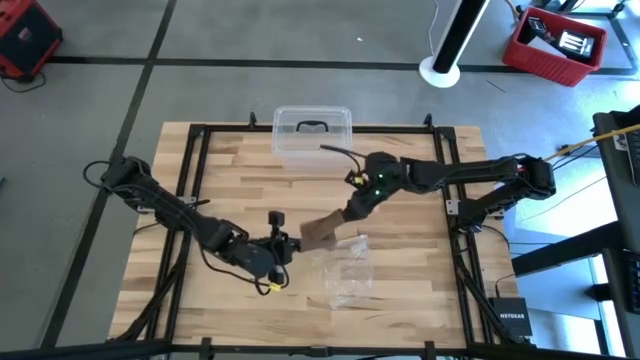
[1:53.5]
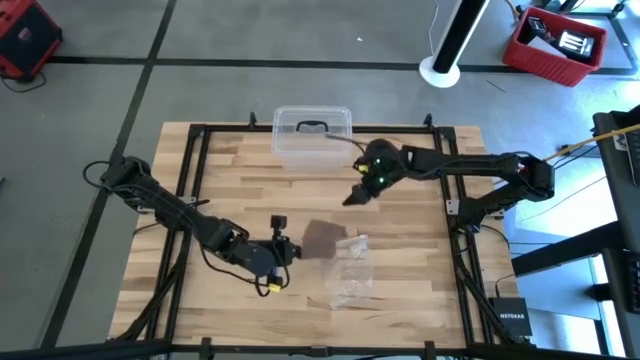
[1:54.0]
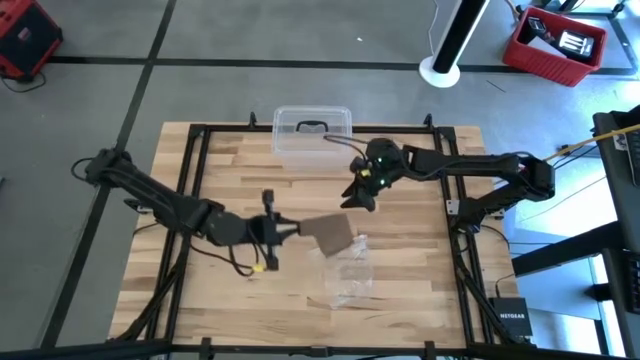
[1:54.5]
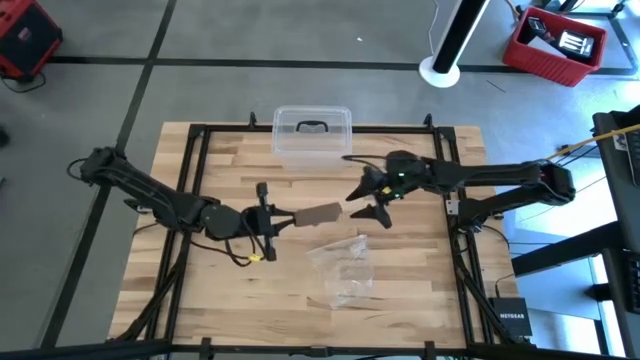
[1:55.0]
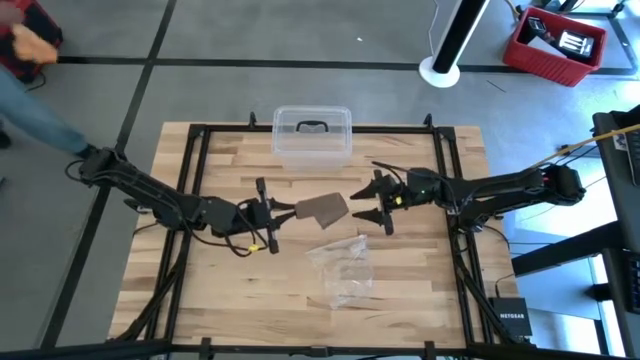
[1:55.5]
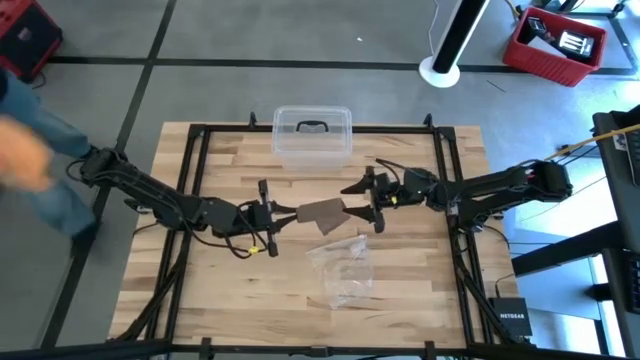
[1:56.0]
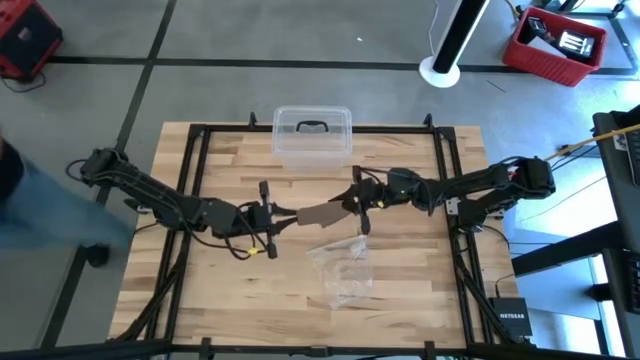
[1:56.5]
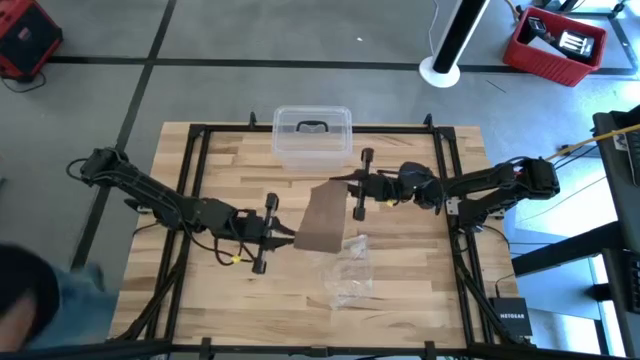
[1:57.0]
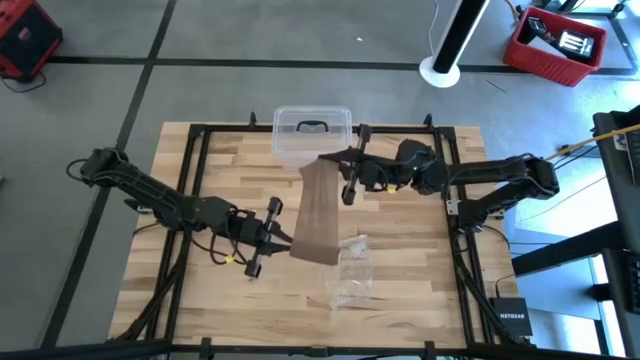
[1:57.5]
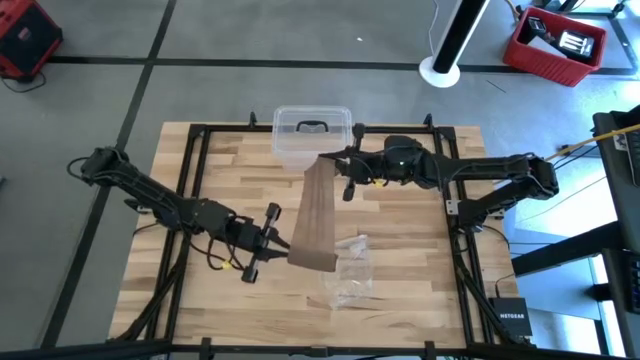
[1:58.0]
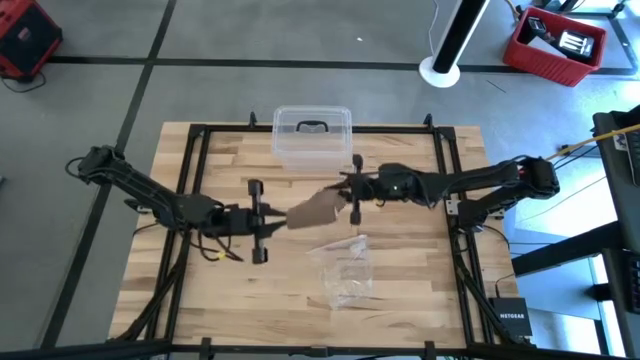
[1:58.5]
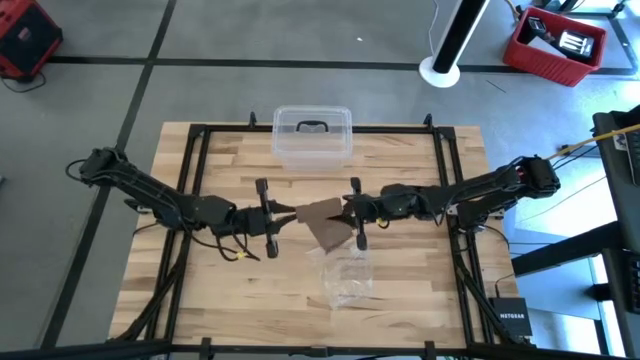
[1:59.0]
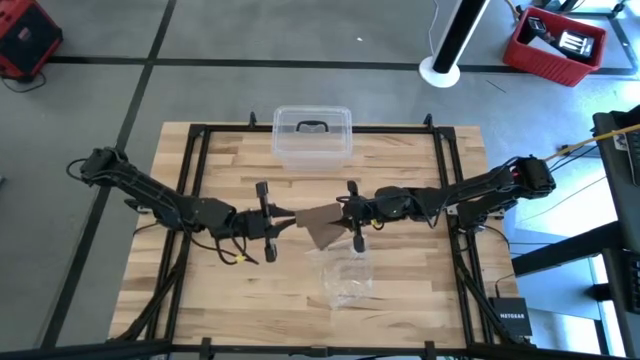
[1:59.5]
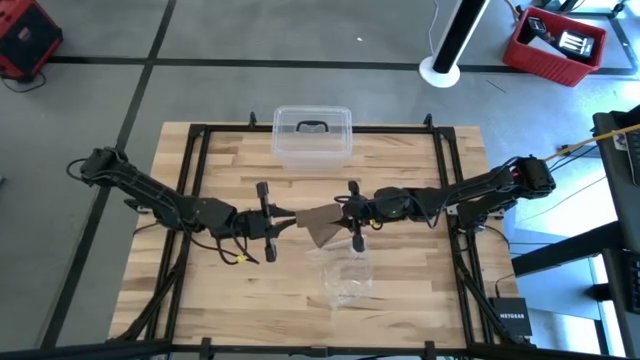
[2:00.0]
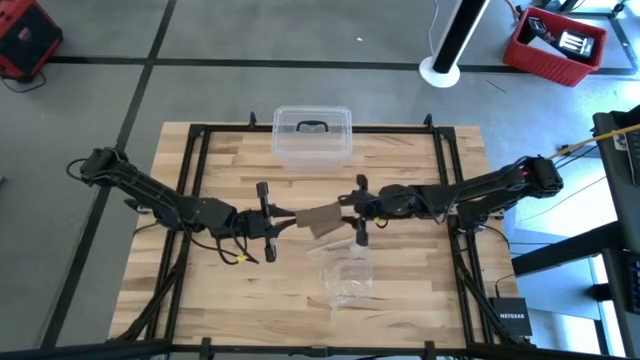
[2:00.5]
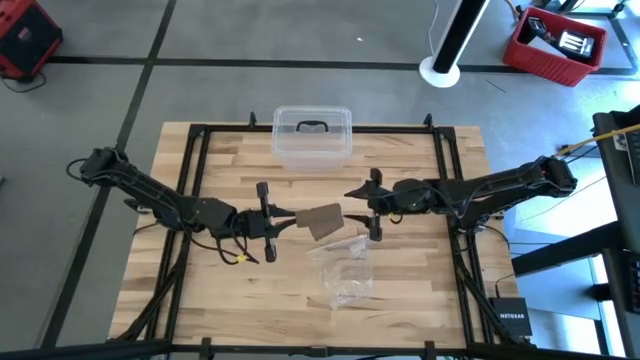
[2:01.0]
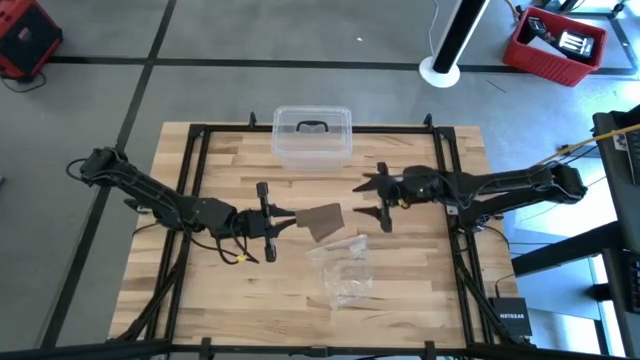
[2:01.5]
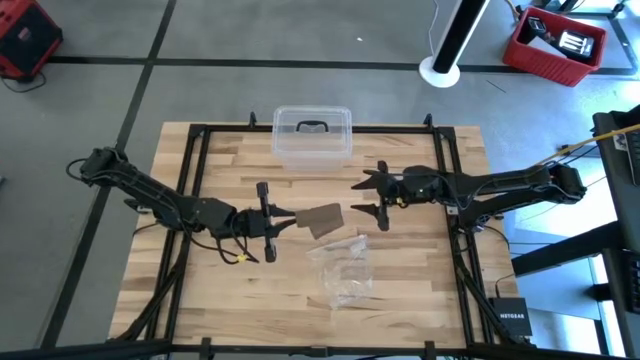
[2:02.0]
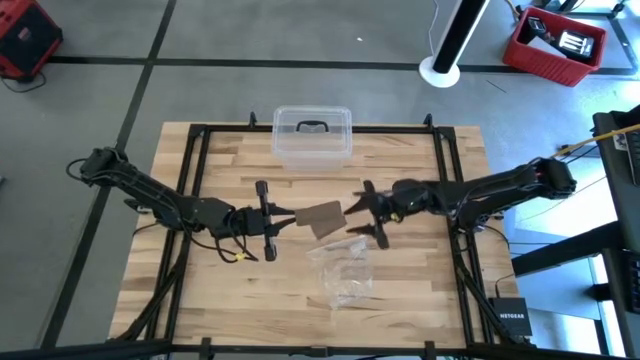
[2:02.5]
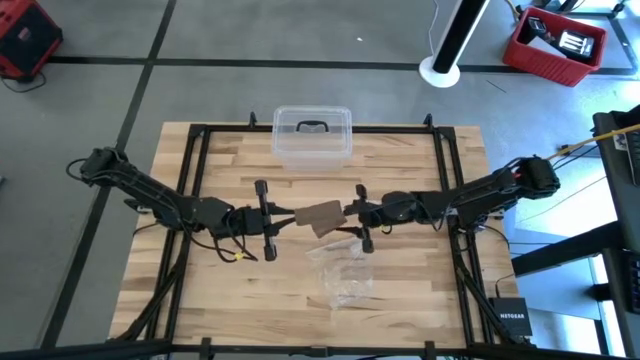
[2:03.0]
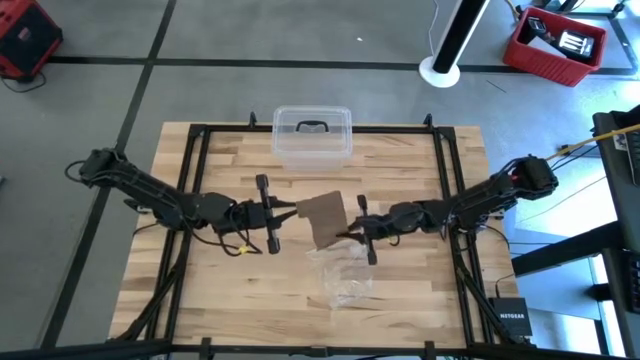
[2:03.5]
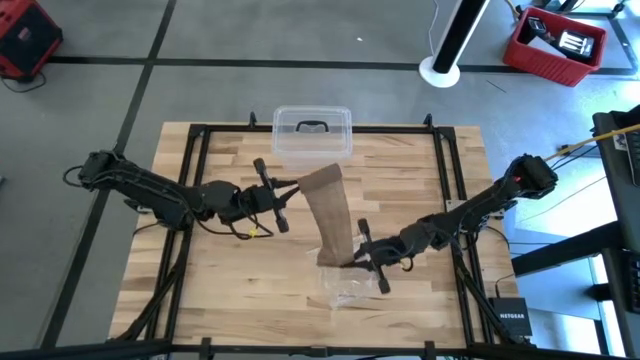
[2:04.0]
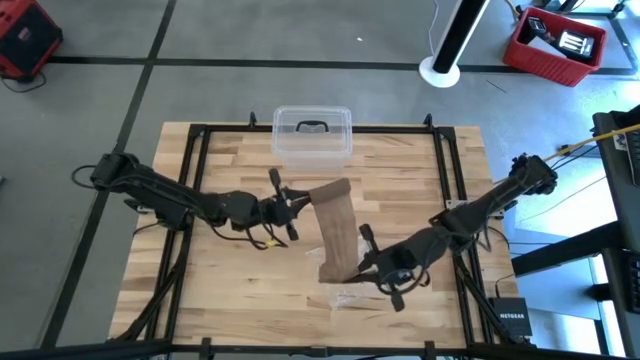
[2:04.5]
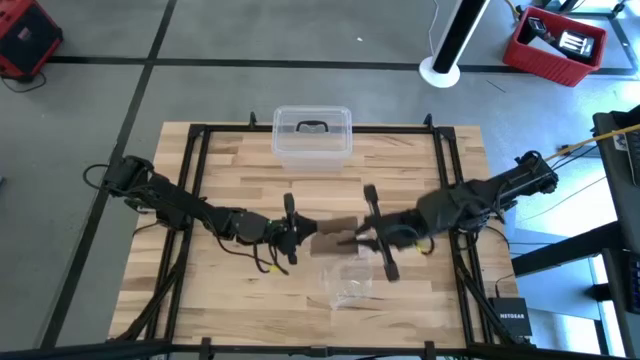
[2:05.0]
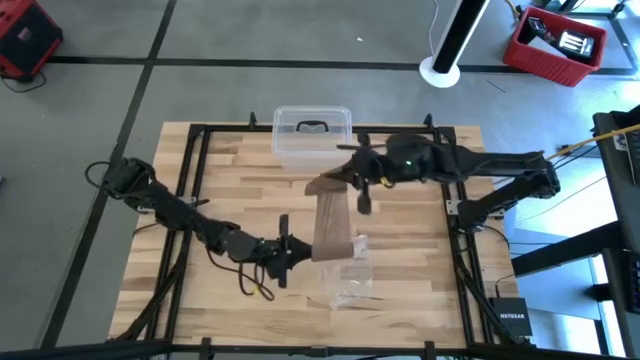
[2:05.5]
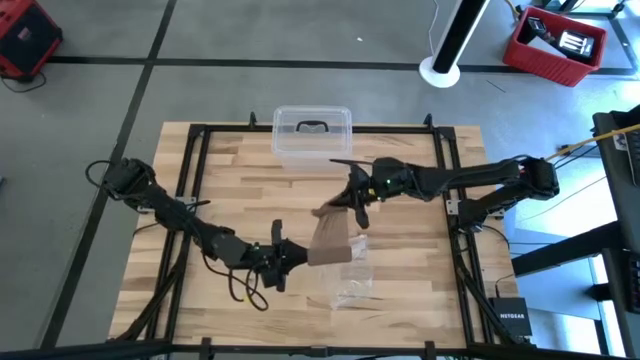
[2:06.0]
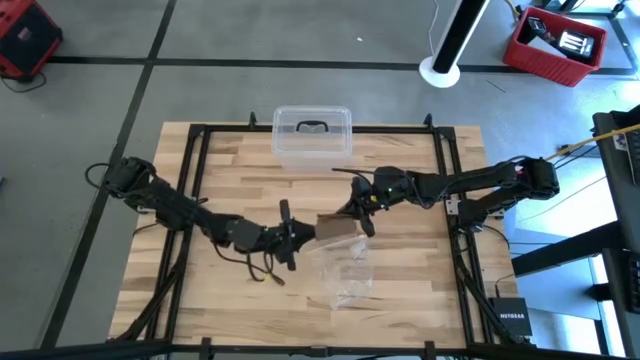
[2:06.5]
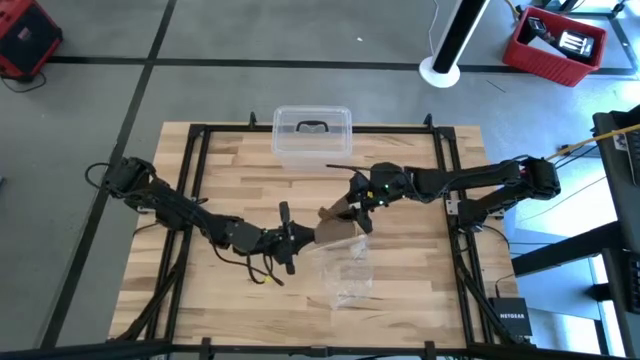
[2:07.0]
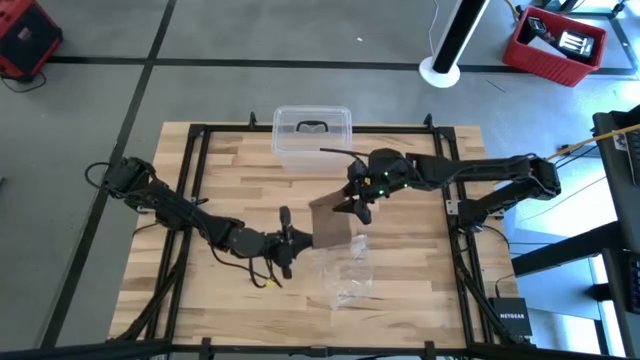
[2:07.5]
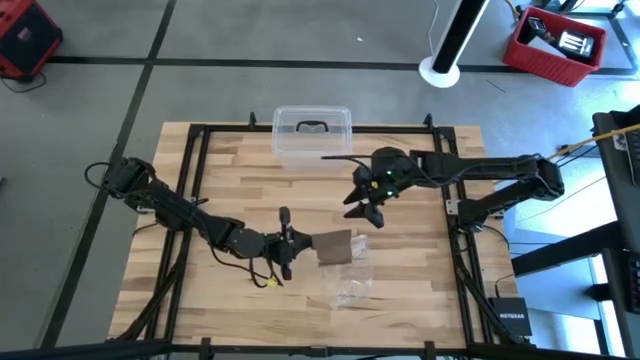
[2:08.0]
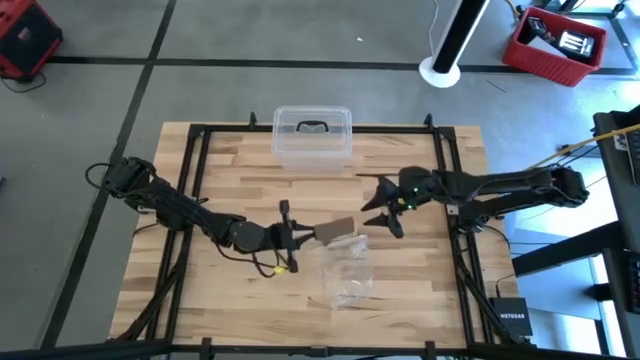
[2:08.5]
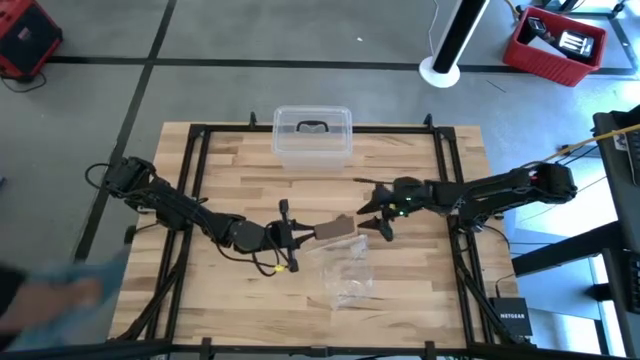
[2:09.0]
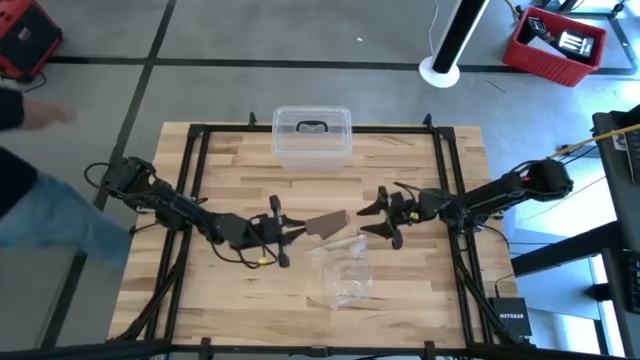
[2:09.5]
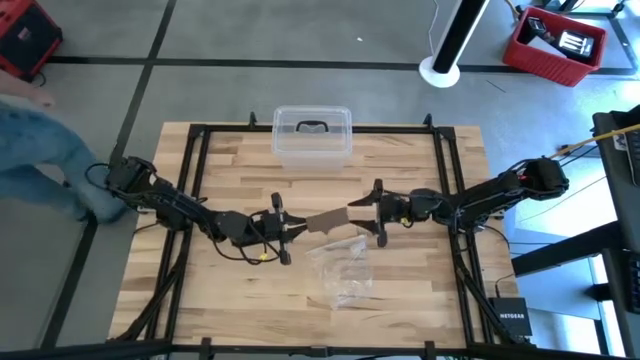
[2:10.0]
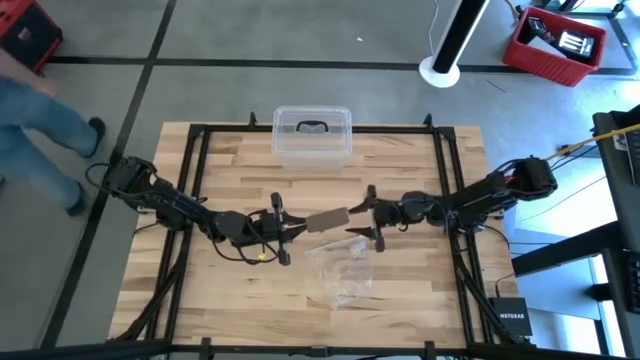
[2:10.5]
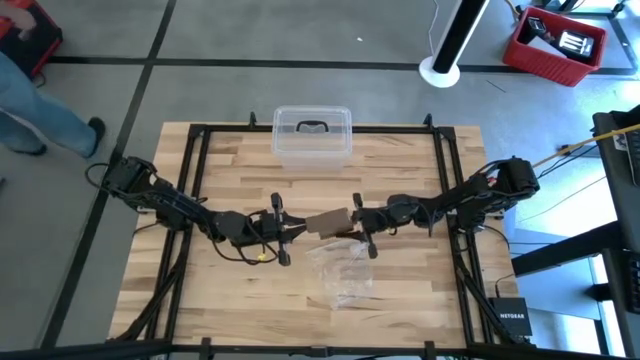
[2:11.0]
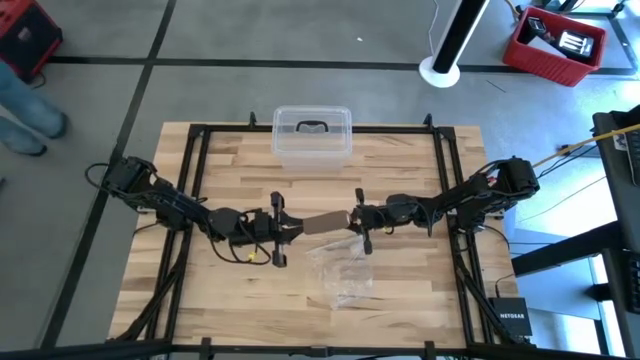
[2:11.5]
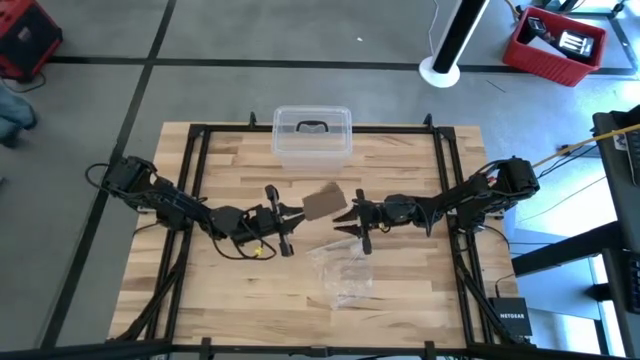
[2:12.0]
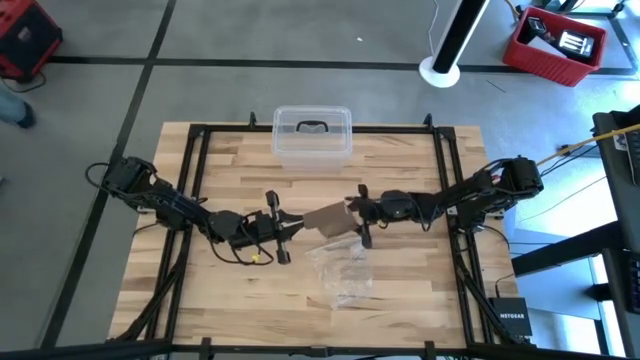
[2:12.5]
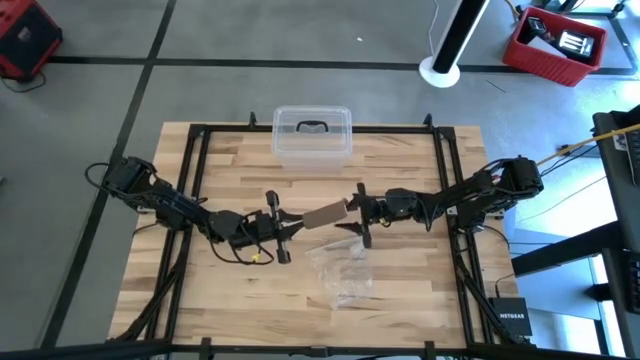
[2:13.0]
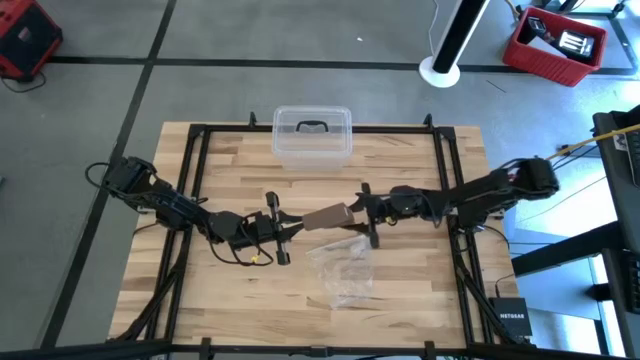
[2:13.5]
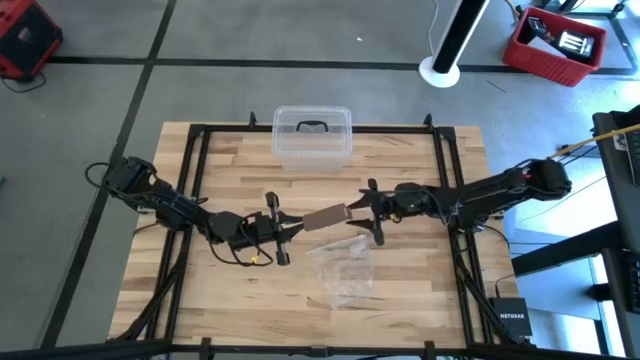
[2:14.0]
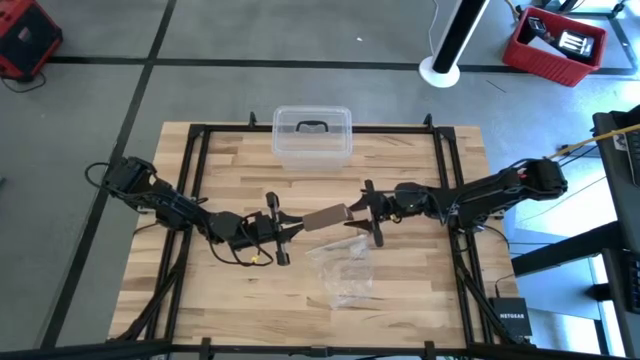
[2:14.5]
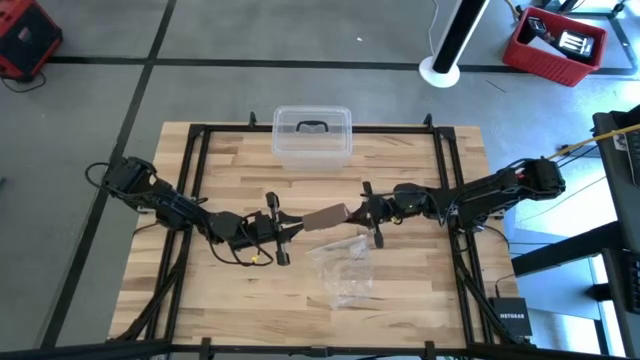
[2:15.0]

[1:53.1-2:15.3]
Task: Roll bandage
Roll the brown bandage
